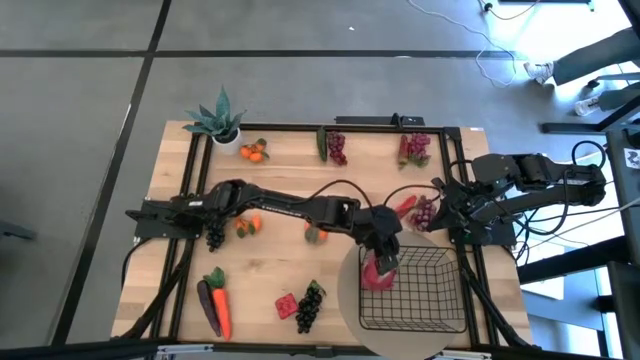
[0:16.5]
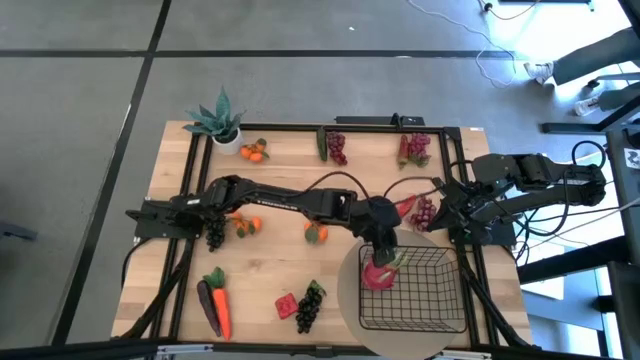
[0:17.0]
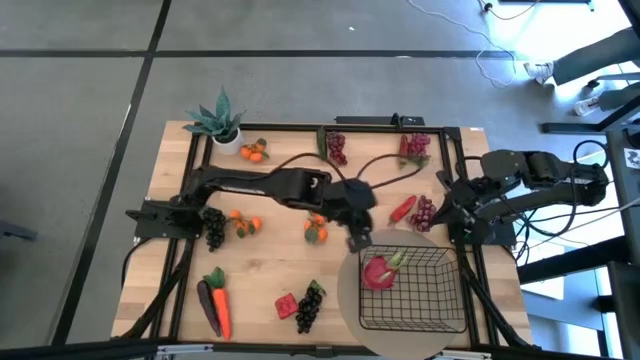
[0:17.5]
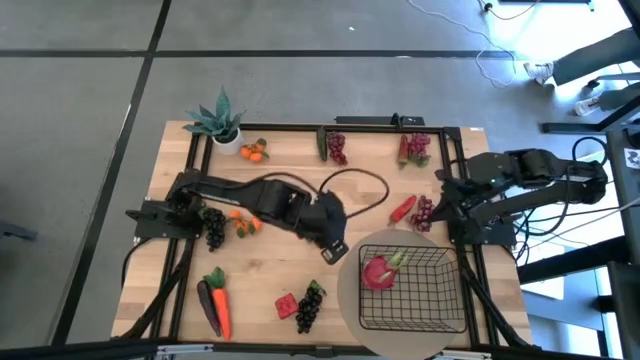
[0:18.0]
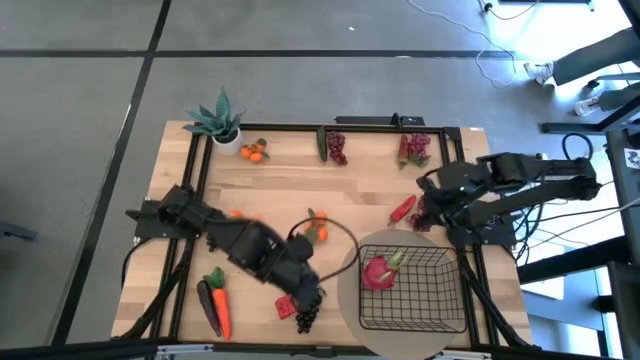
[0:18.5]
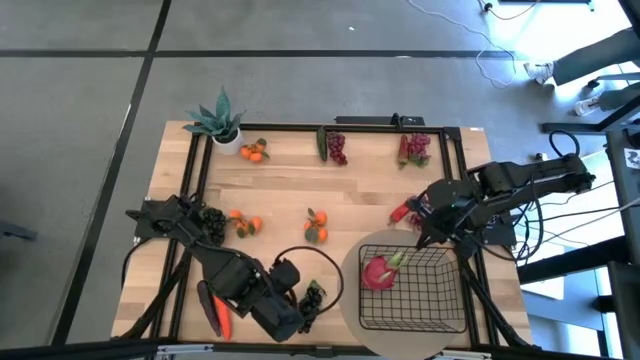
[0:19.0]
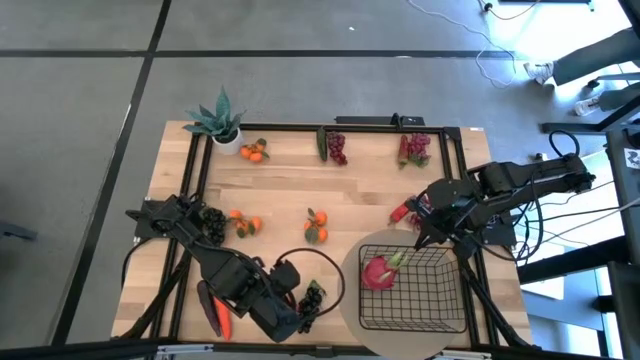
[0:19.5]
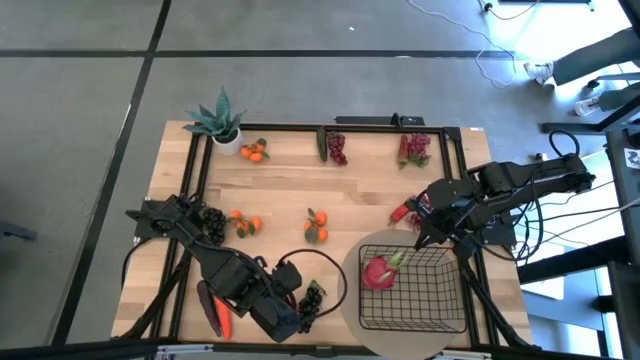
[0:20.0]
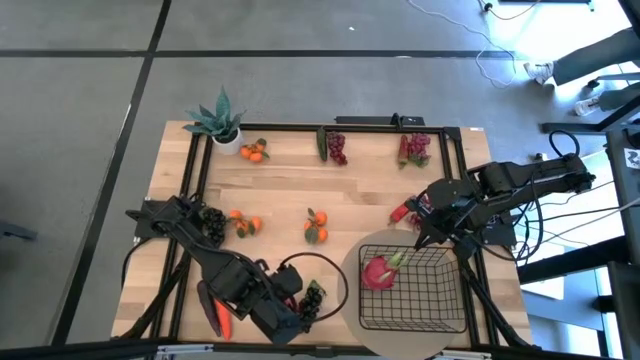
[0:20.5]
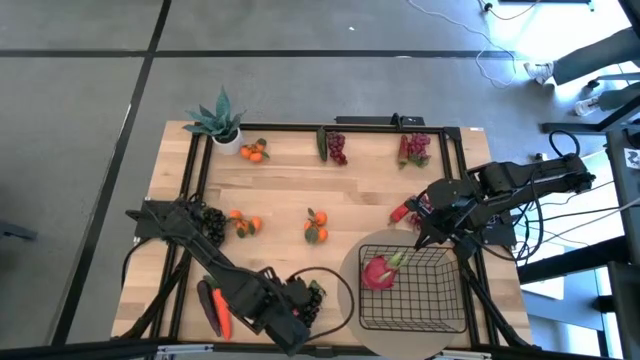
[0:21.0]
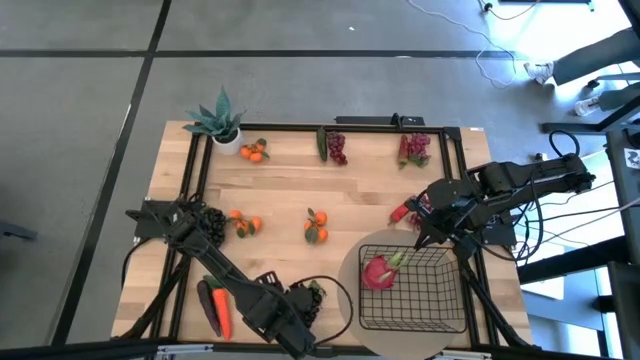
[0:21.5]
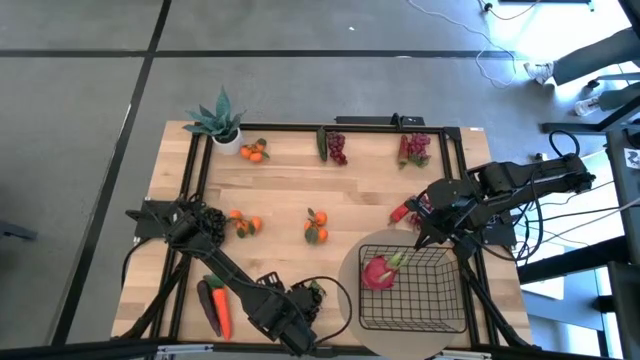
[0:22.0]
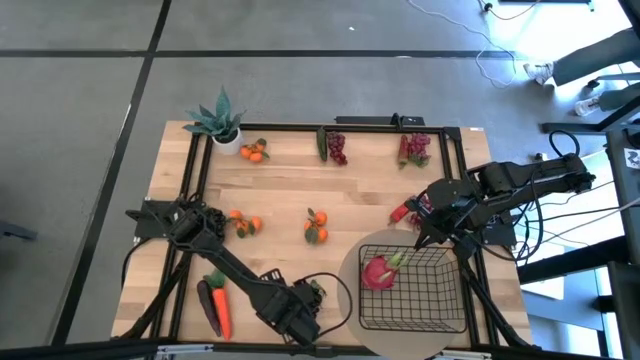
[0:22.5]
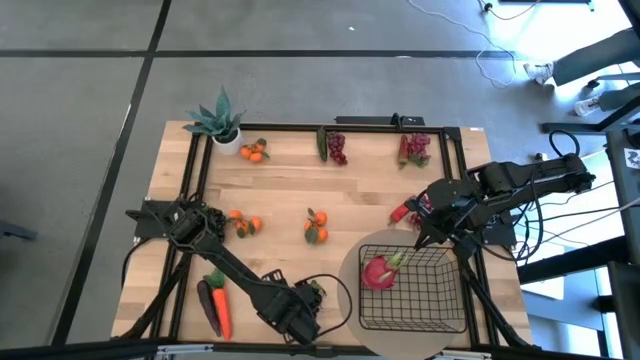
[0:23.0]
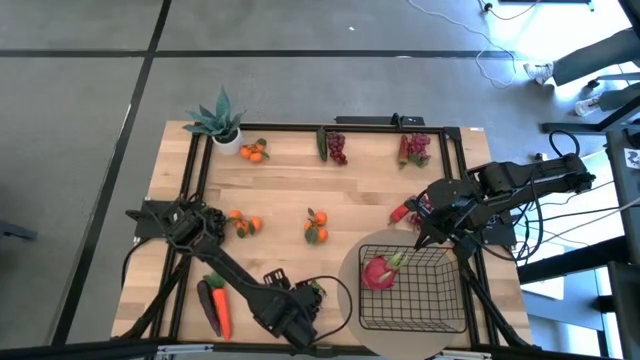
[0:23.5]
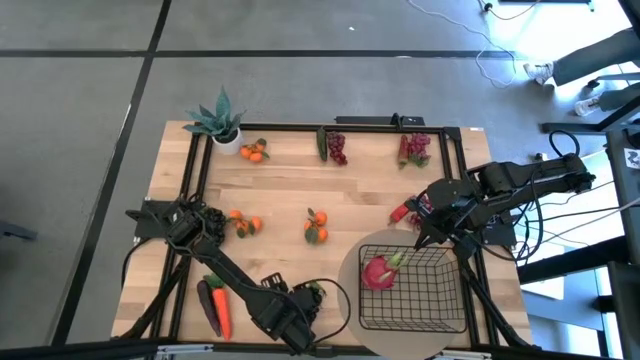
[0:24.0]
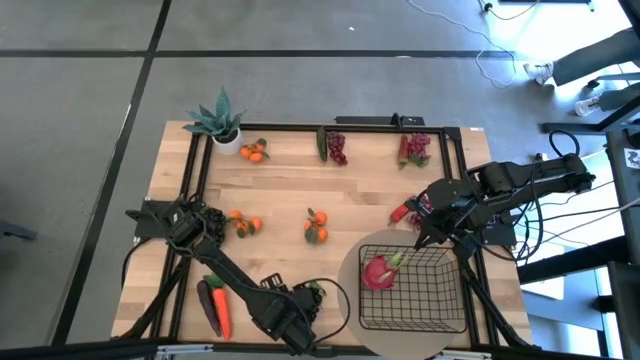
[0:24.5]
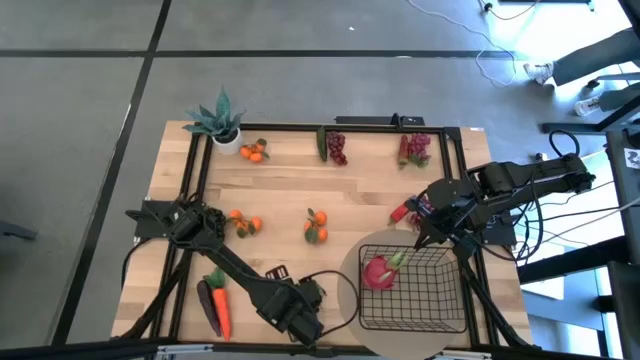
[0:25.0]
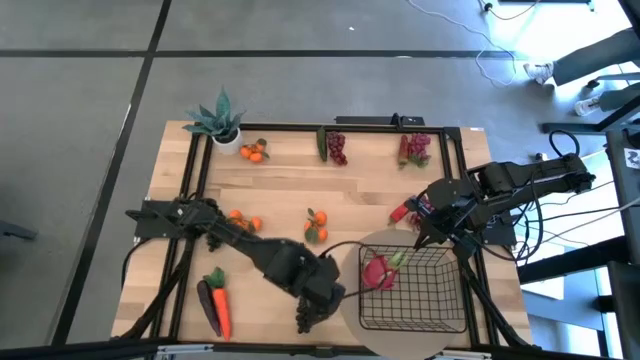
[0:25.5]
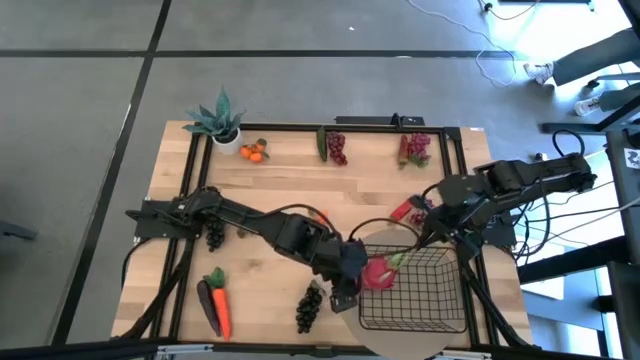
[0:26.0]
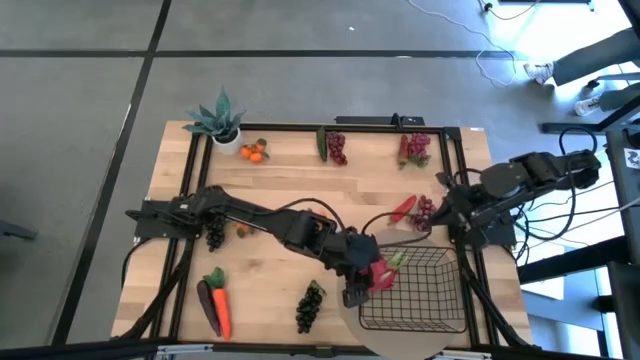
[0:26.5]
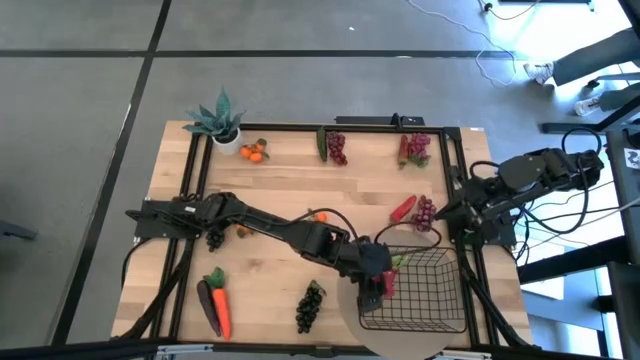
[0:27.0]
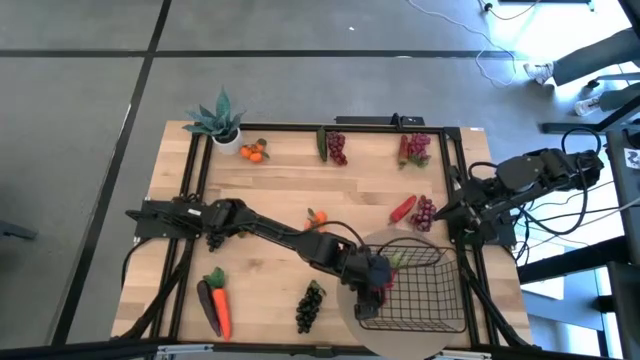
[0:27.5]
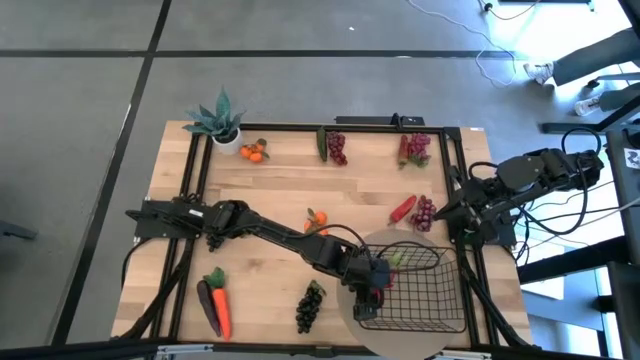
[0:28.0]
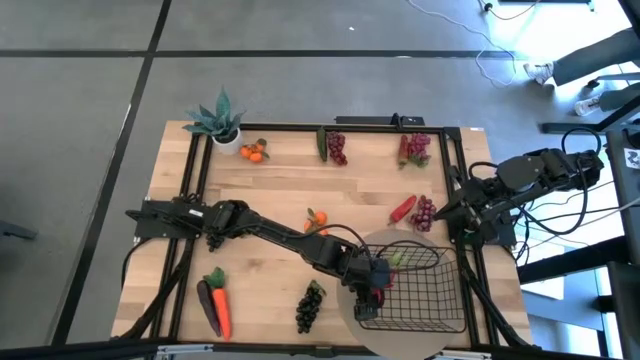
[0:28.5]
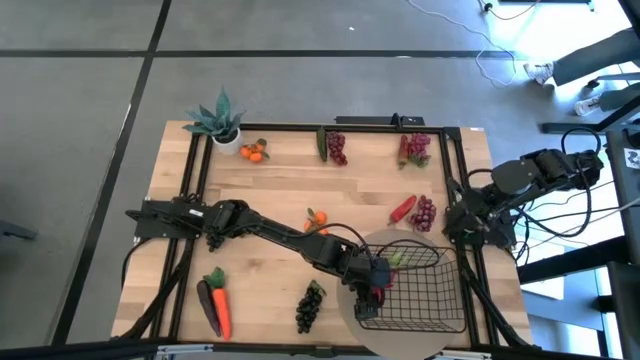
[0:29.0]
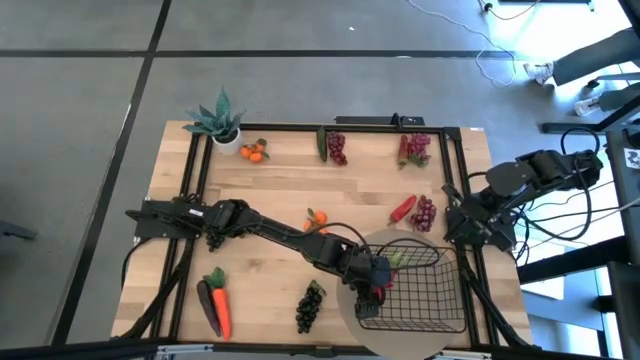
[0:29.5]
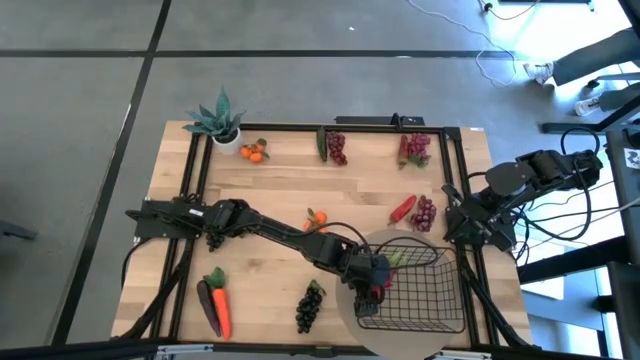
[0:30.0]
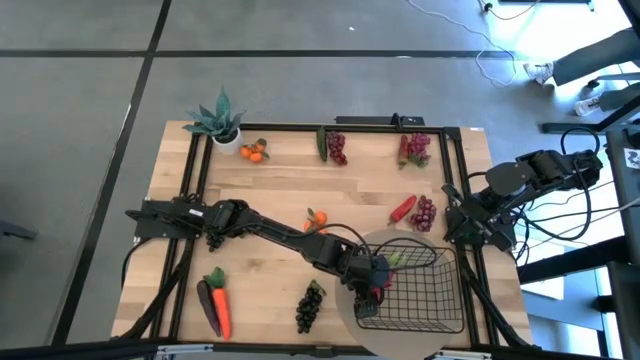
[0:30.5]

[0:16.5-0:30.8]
Task: Build produce basket
Put the red bell pepper into the black wire basket

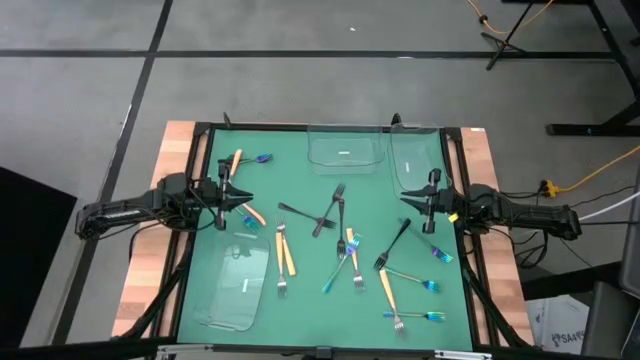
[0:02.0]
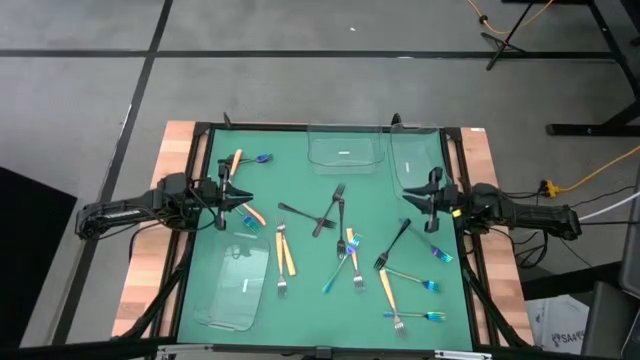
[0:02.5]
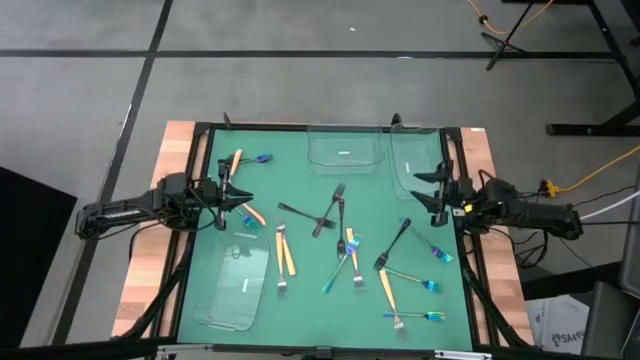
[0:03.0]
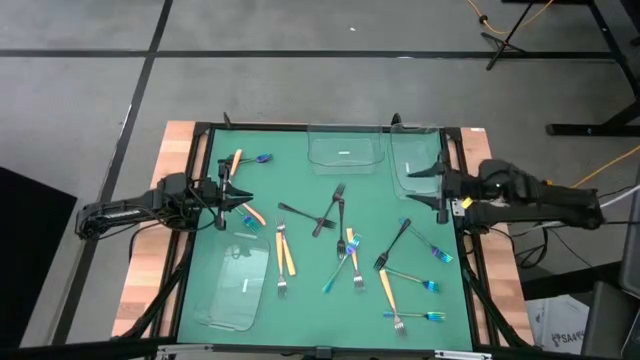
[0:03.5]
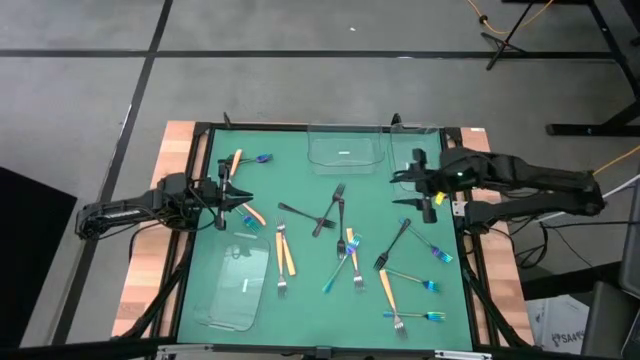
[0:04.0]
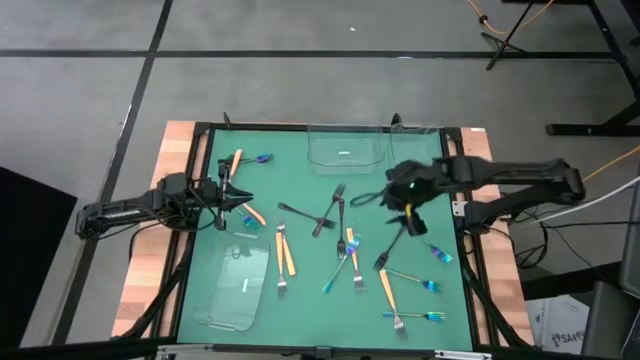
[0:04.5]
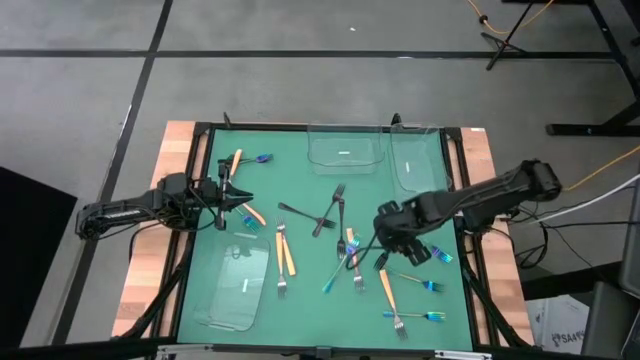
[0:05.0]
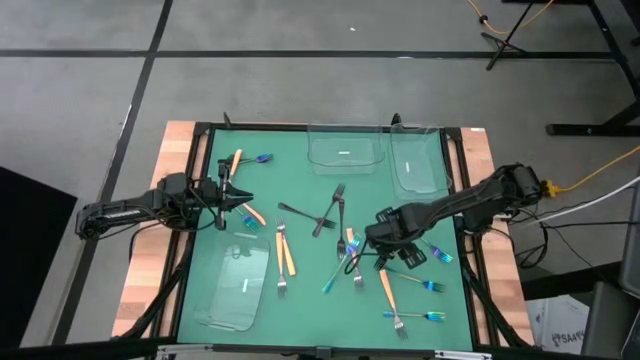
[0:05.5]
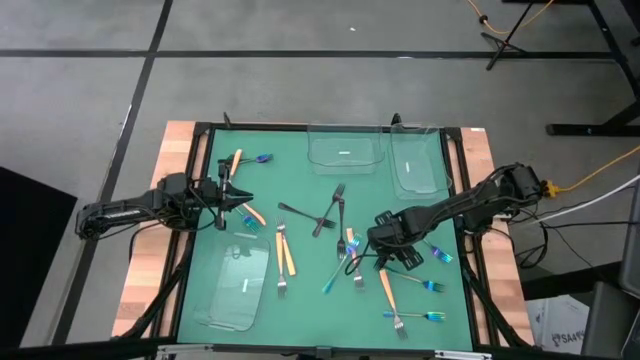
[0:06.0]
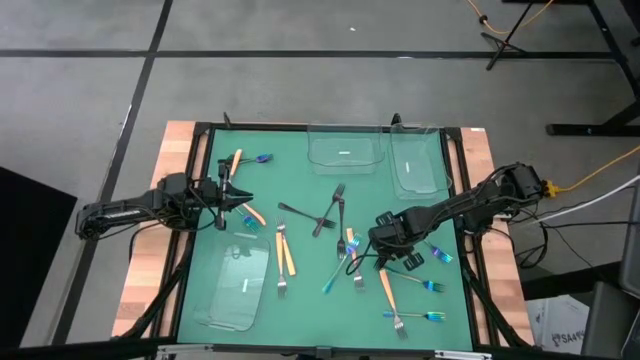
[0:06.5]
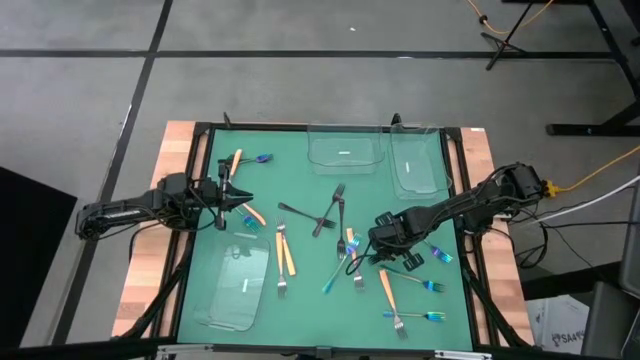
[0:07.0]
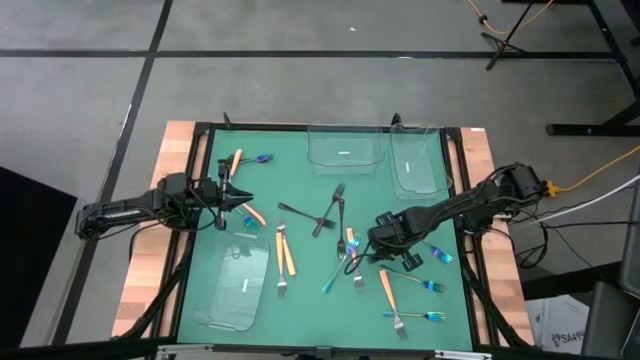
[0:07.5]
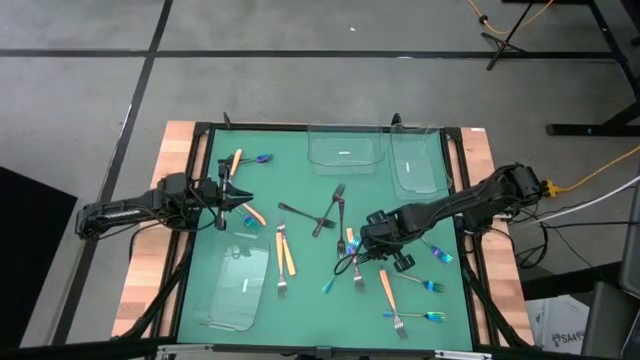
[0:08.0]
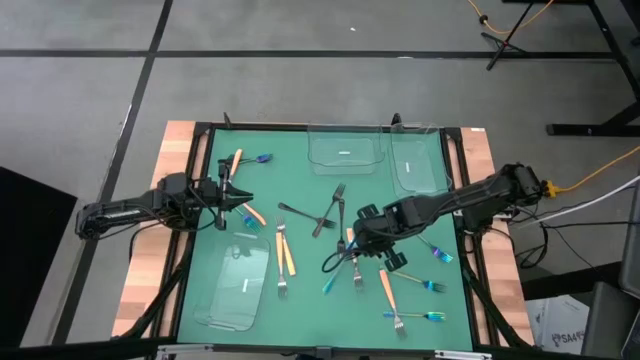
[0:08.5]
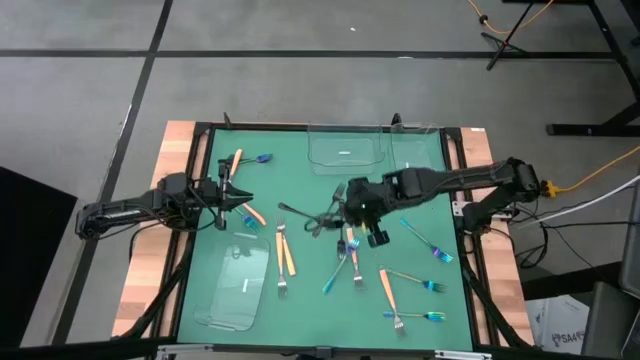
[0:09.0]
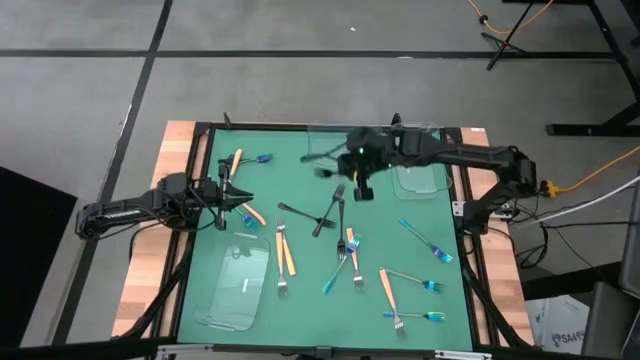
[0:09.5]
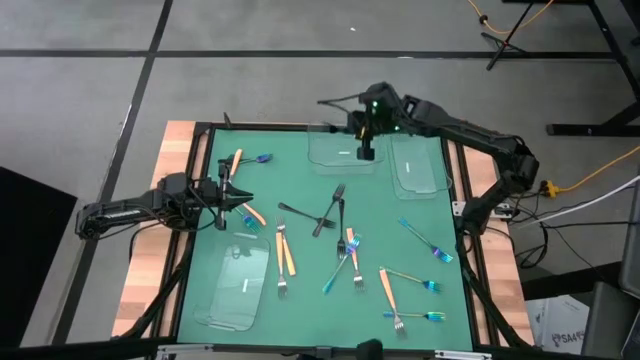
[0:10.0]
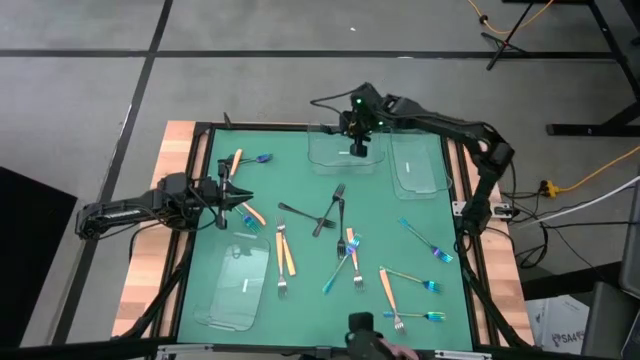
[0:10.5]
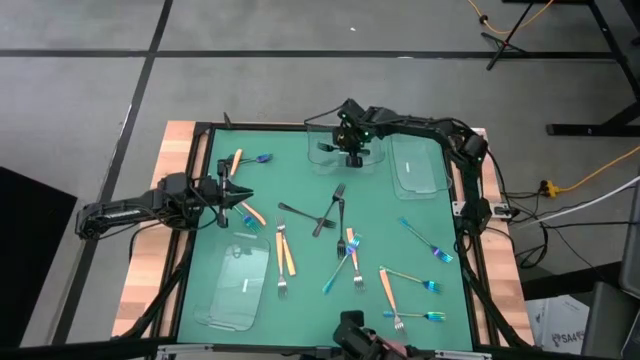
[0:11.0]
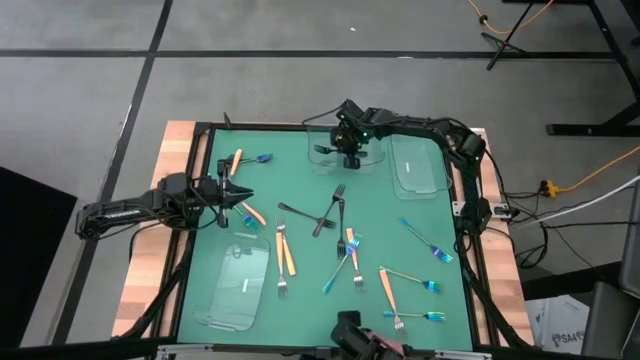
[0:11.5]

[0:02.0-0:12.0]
Task: Sort silverware by color (type)
Put the black fork into the top left transparent bin
